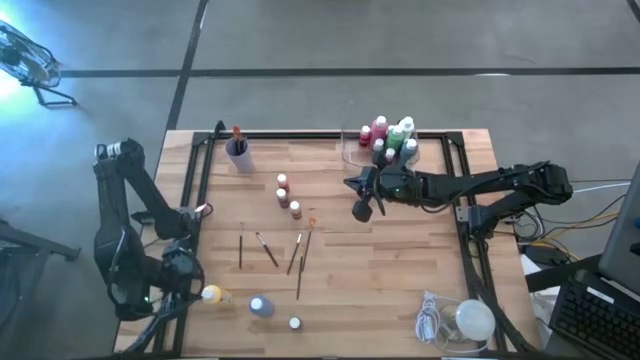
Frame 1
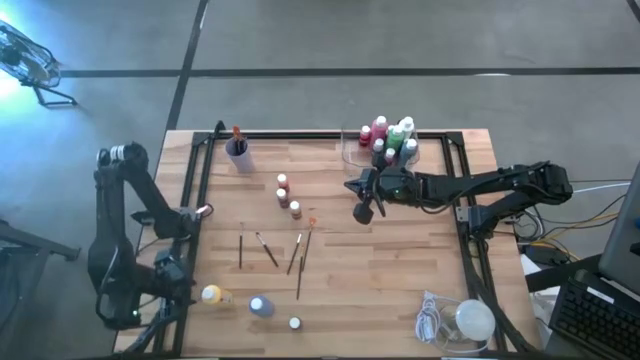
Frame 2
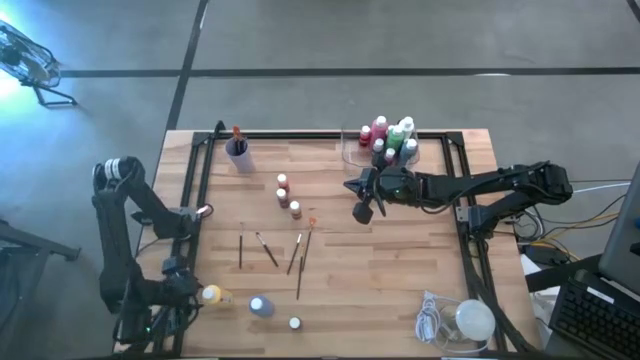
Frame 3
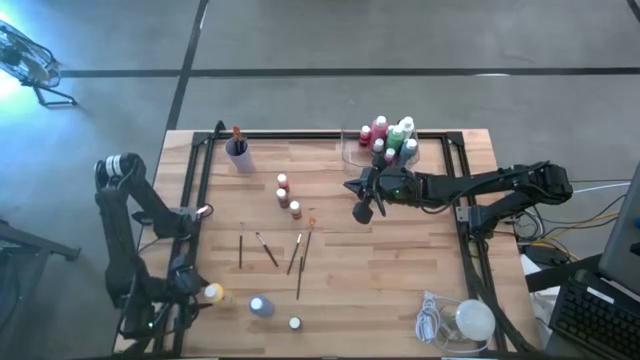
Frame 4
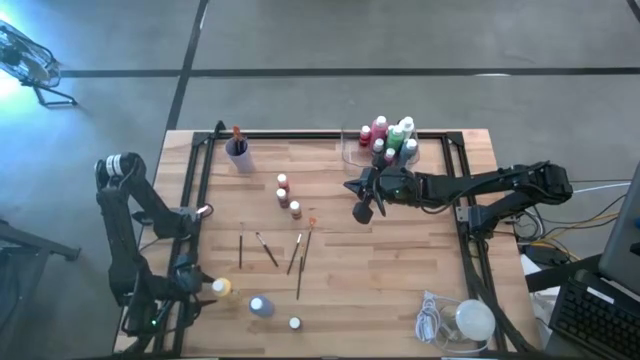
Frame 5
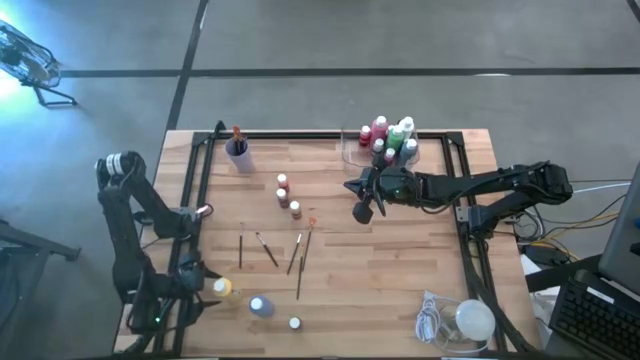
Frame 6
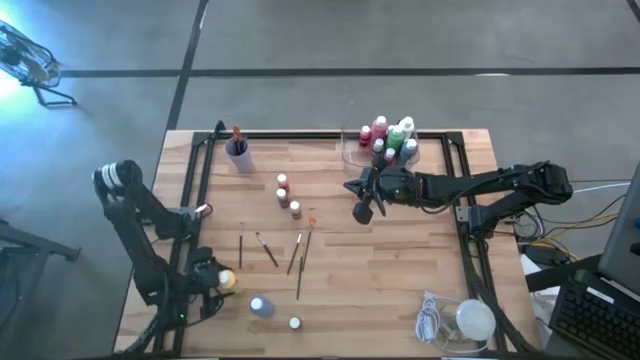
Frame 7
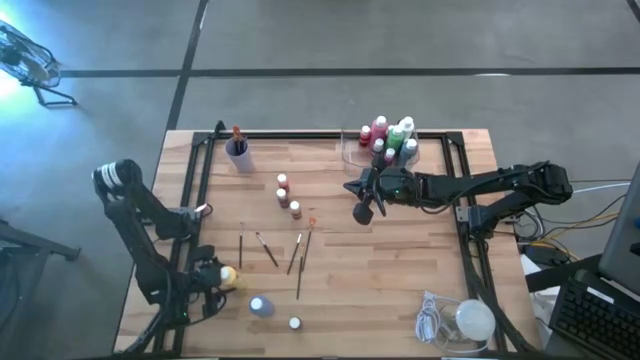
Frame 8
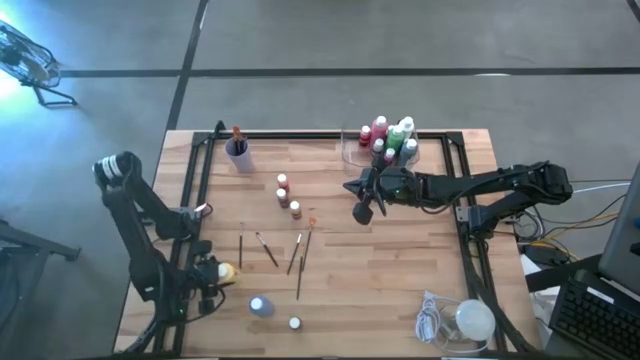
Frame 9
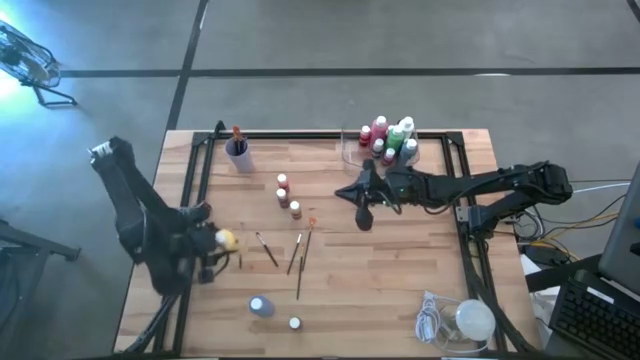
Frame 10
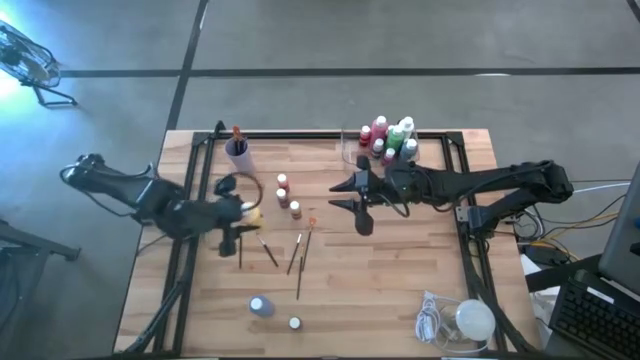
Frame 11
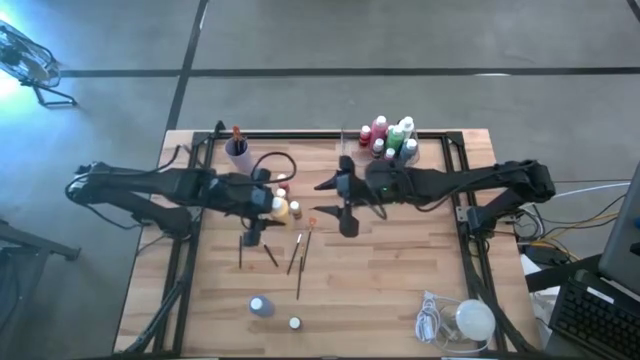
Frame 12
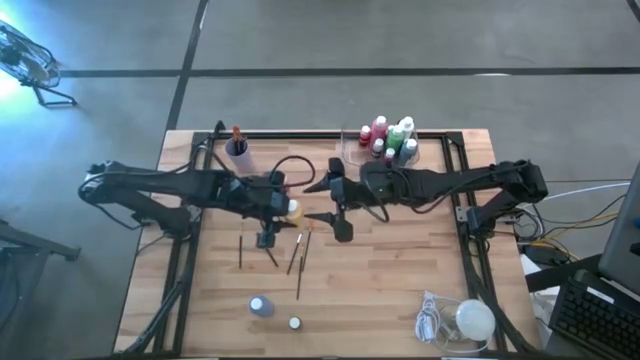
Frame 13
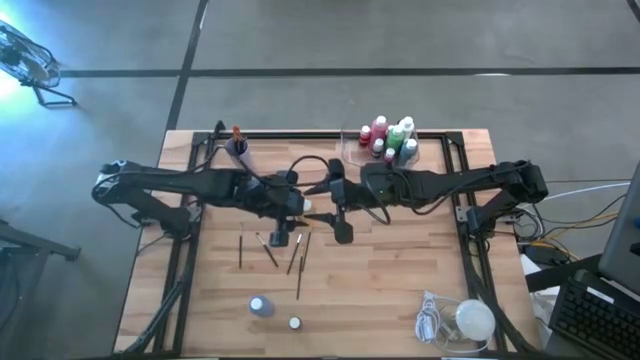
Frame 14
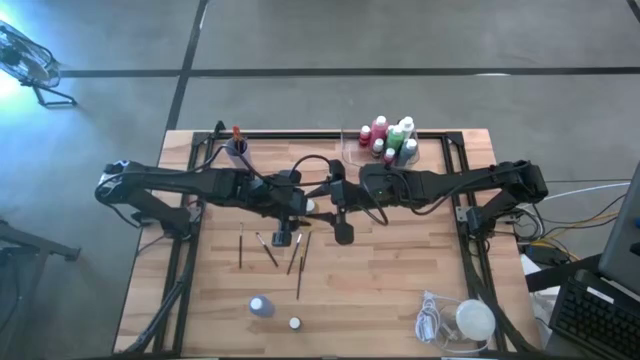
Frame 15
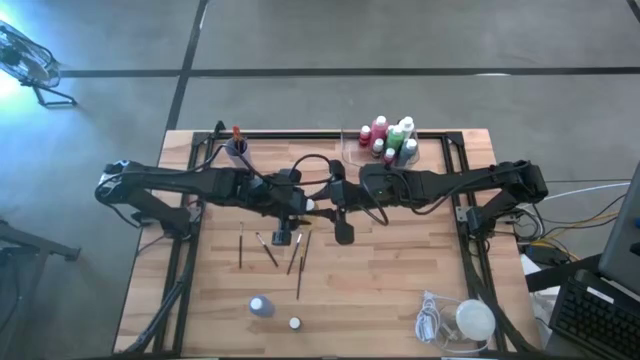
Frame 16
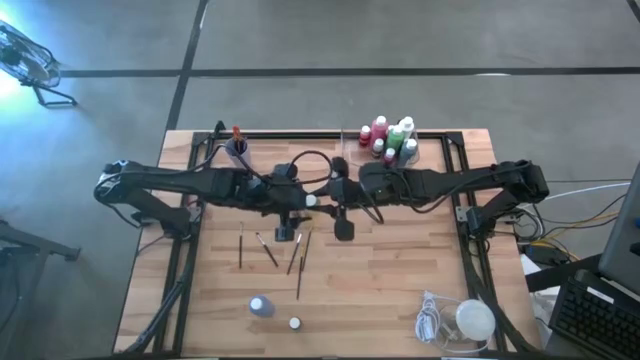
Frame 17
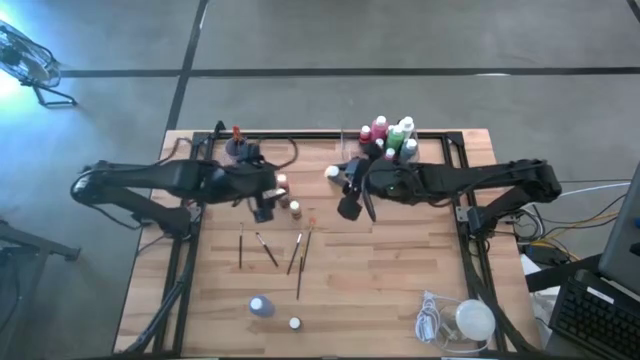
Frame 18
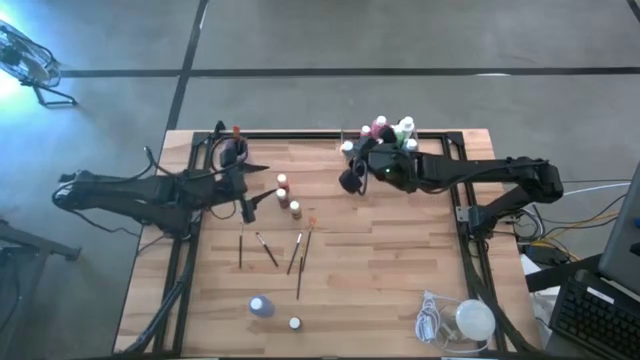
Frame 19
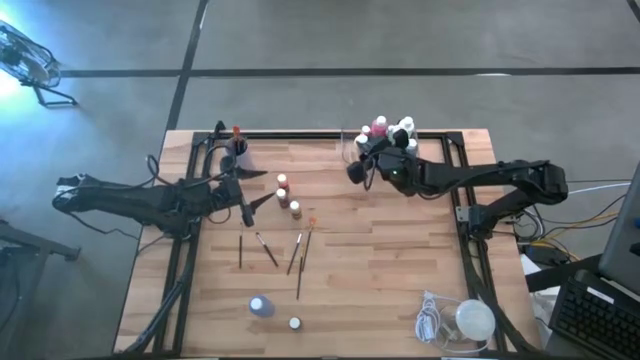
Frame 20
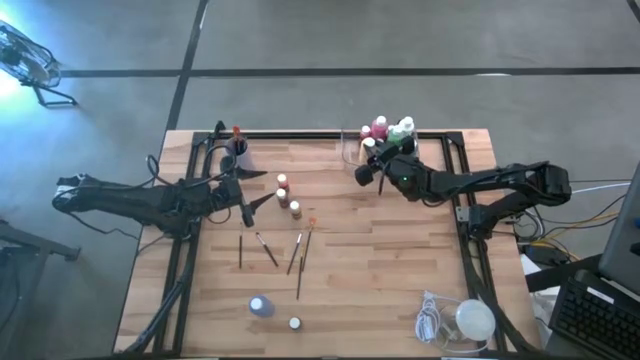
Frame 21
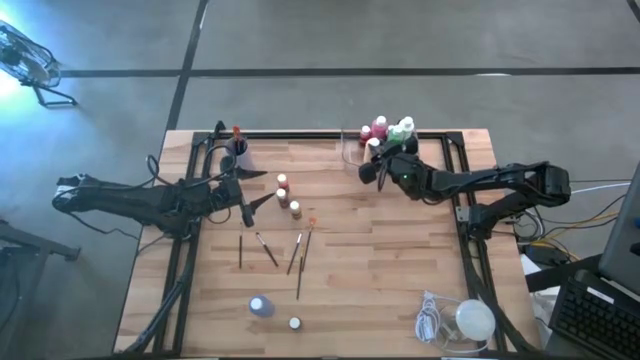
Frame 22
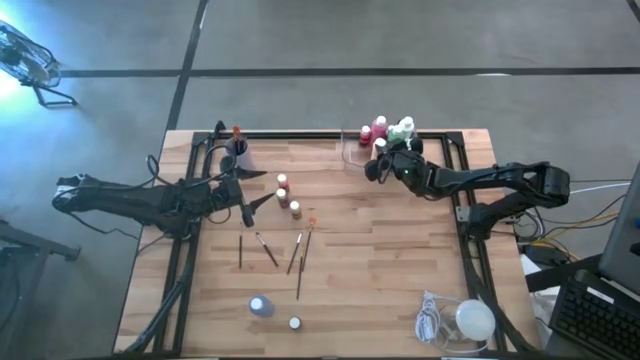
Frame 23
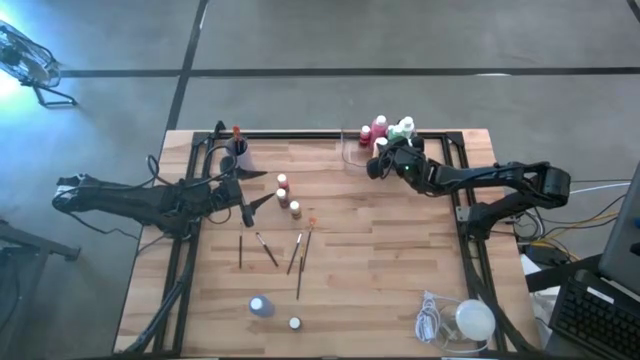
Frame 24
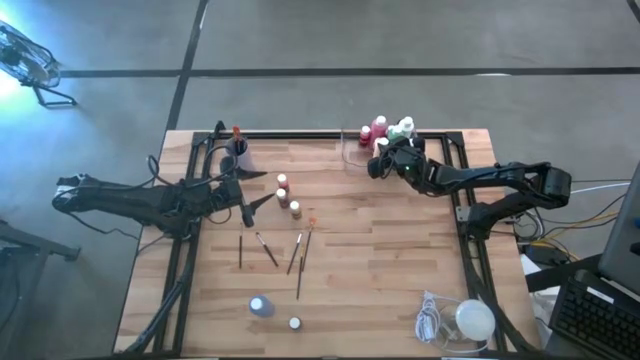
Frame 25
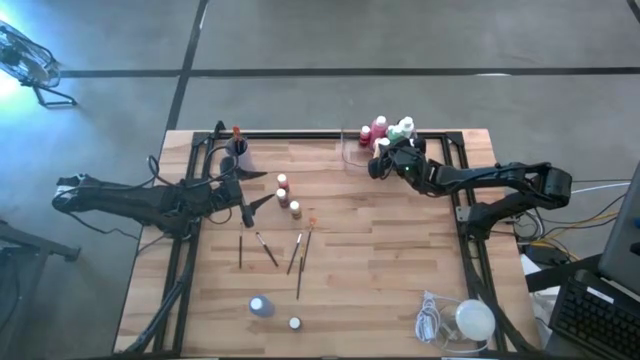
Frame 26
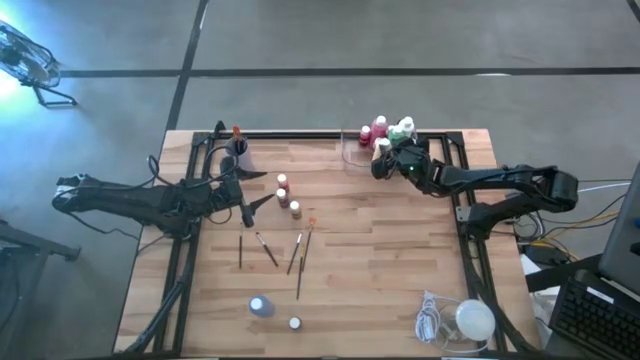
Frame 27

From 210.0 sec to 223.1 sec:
Task: Pick & Place Paint Supplies
Put the yellow paint bottle into the transparent bin

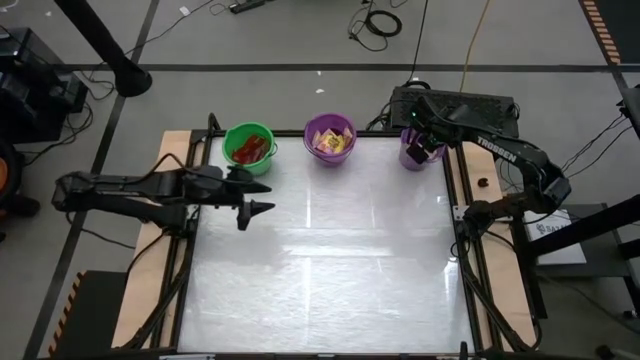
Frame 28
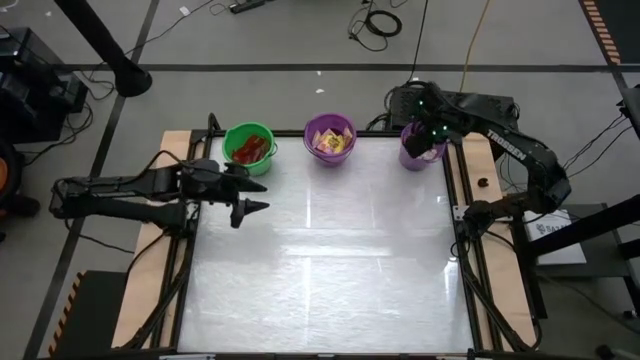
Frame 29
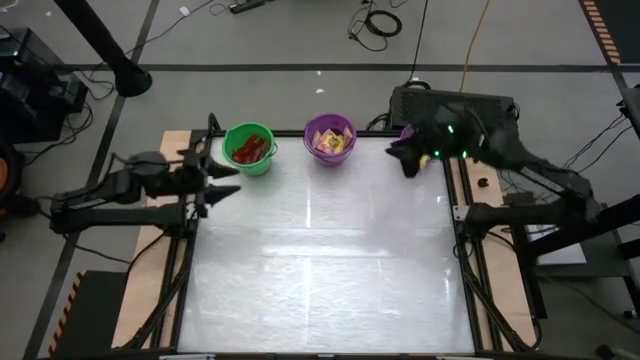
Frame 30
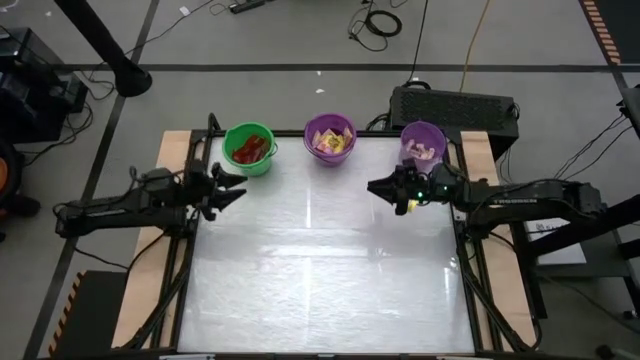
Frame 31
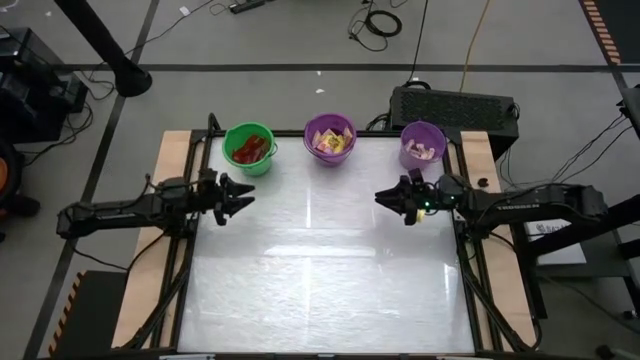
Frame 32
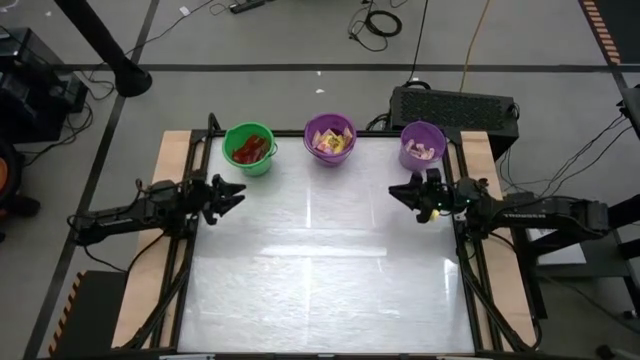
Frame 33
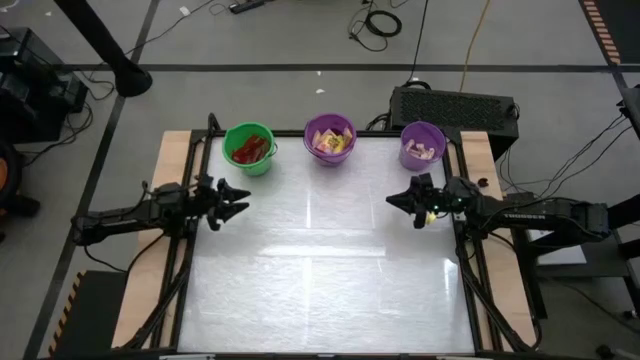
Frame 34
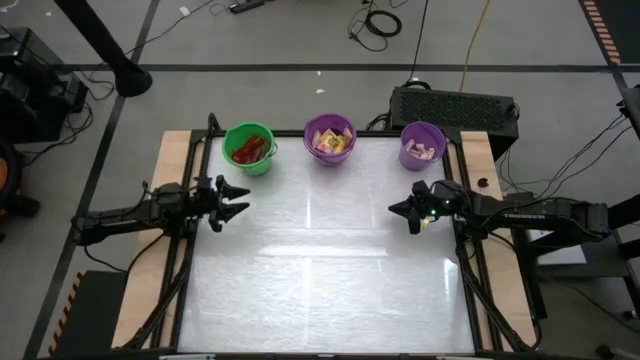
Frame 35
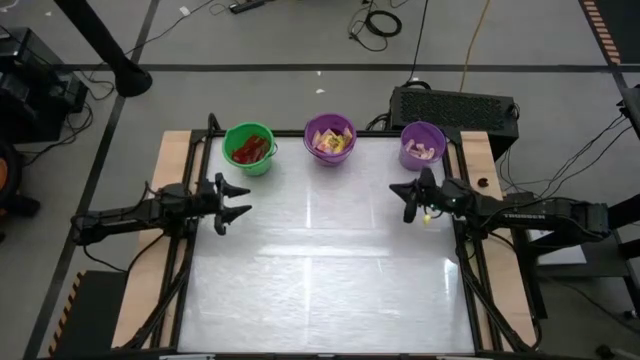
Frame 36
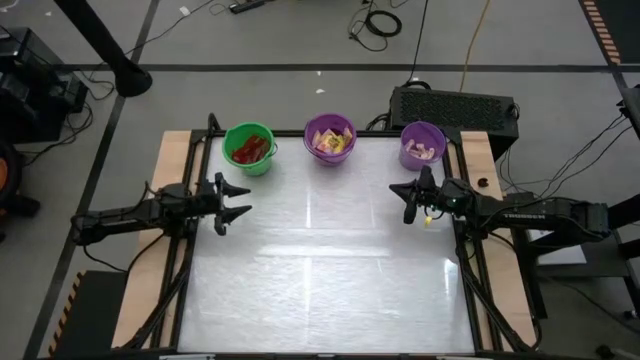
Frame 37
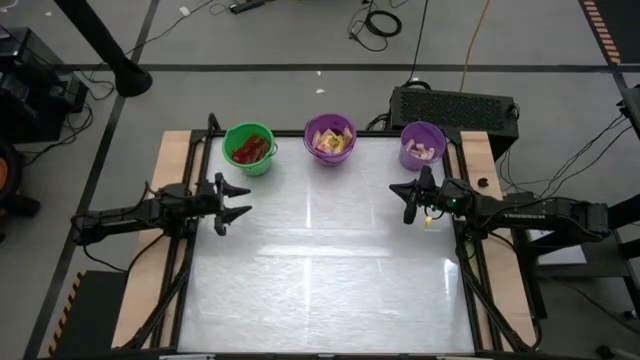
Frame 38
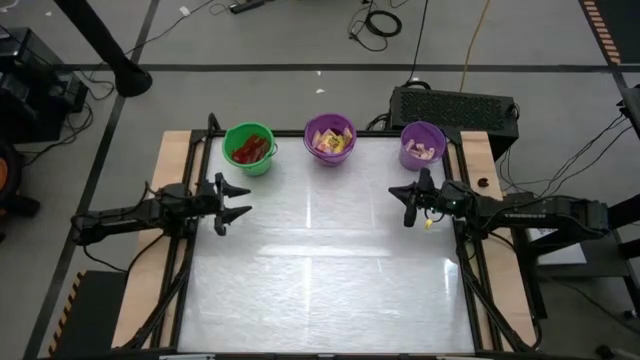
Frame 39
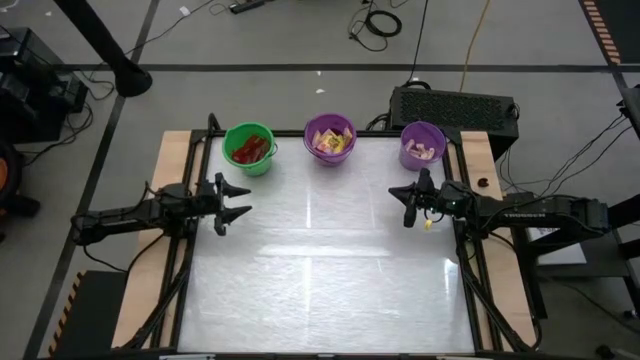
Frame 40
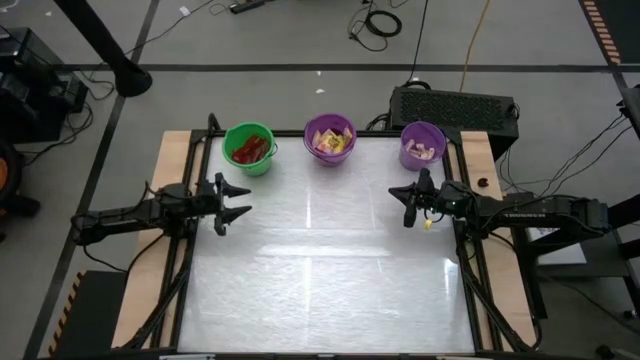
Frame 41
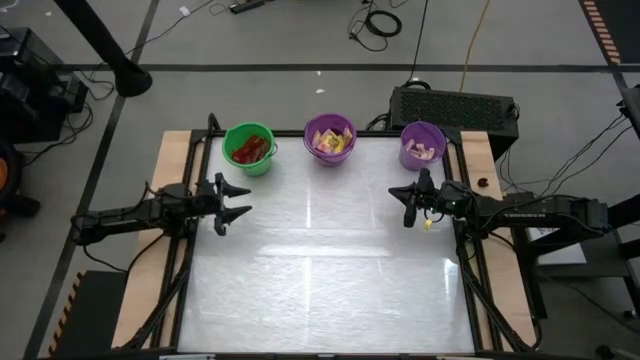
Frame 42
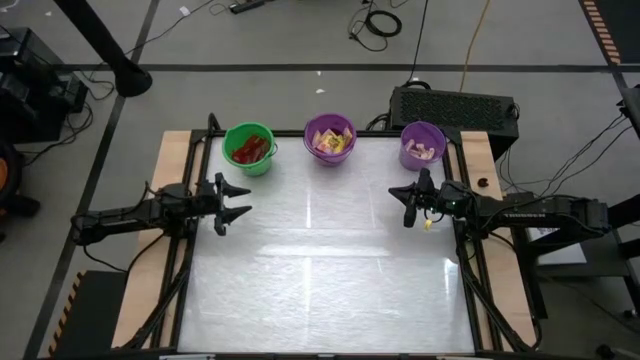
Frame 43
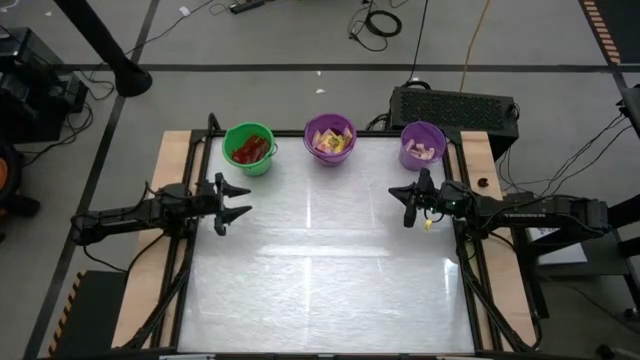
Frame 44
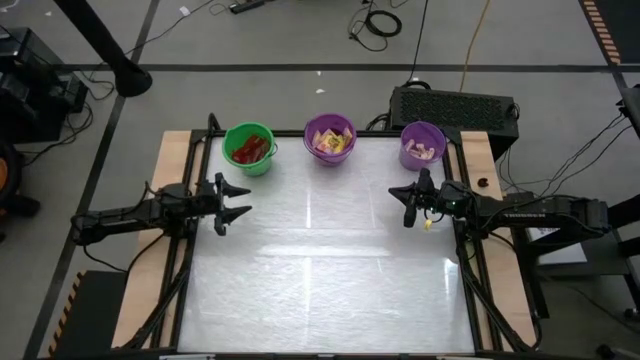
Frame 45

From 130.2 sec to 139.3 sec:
Task: Sort candy by brand, put in halloween buckets
Return to Home Position
